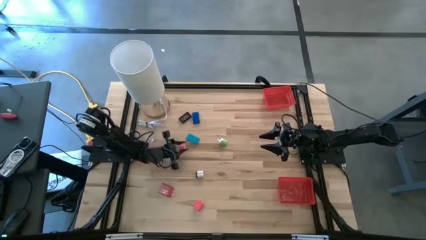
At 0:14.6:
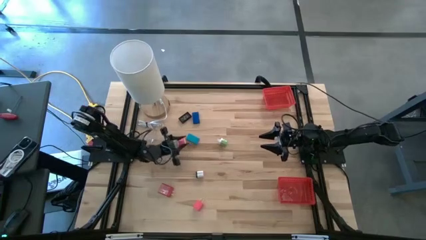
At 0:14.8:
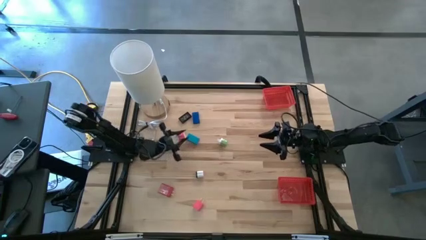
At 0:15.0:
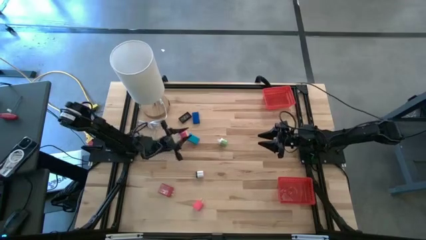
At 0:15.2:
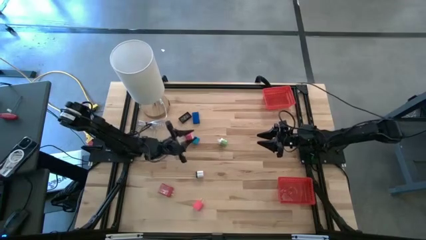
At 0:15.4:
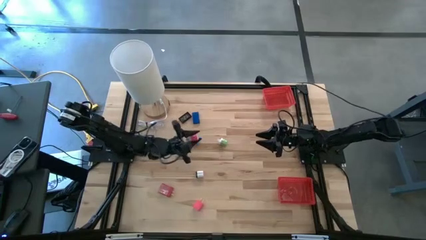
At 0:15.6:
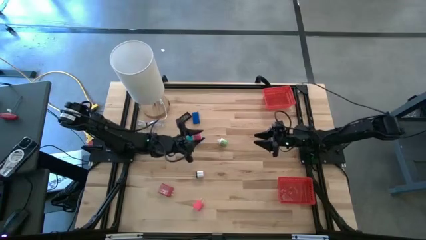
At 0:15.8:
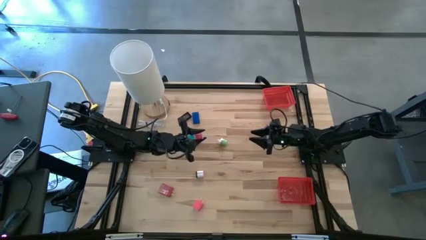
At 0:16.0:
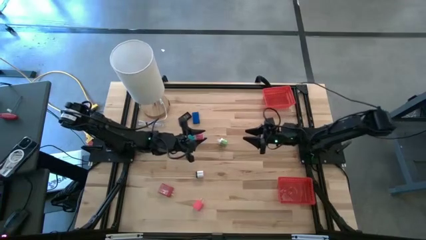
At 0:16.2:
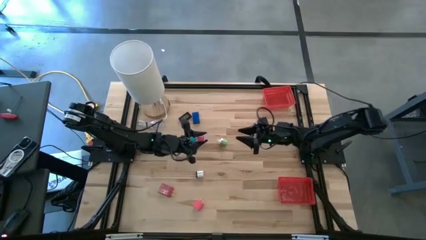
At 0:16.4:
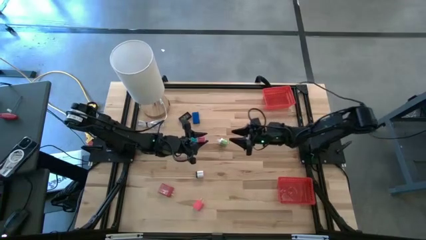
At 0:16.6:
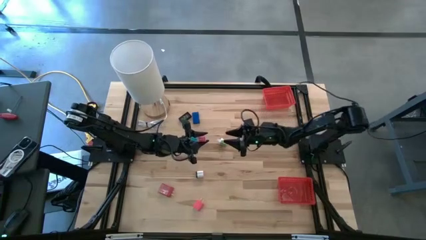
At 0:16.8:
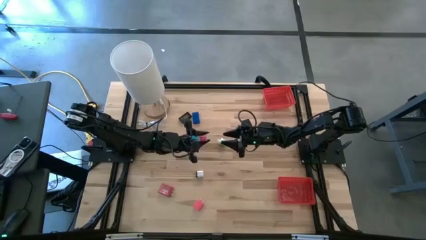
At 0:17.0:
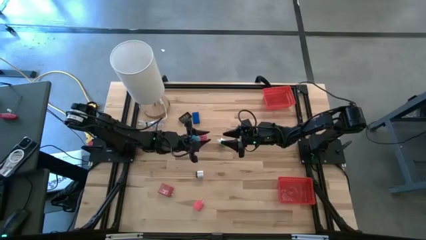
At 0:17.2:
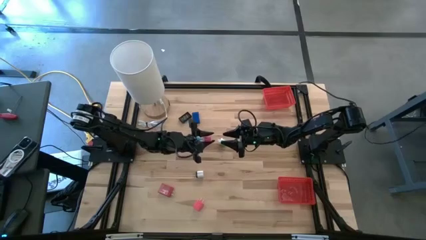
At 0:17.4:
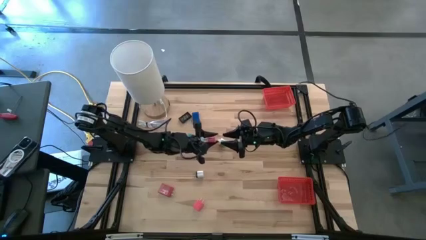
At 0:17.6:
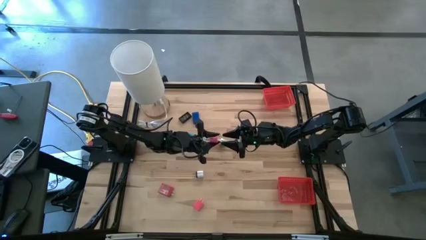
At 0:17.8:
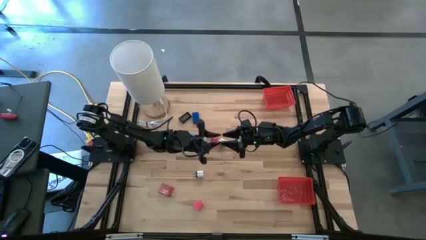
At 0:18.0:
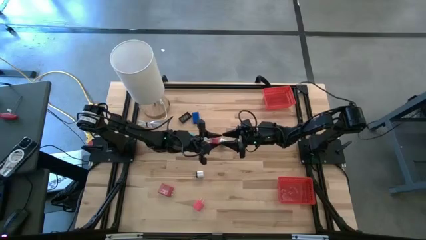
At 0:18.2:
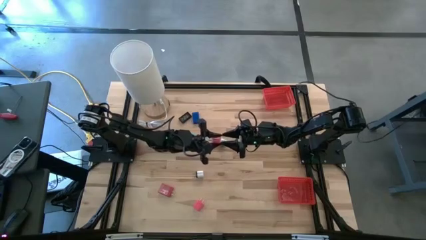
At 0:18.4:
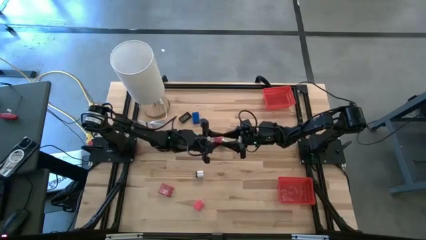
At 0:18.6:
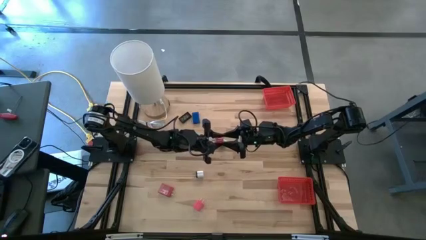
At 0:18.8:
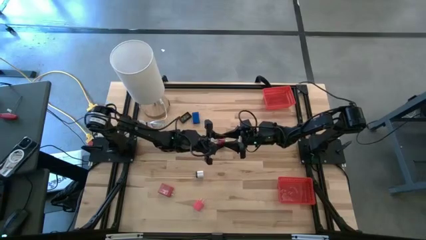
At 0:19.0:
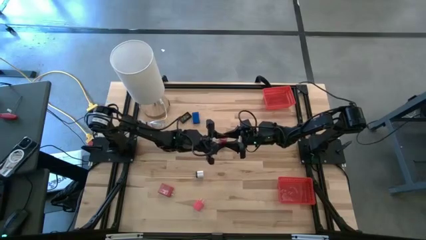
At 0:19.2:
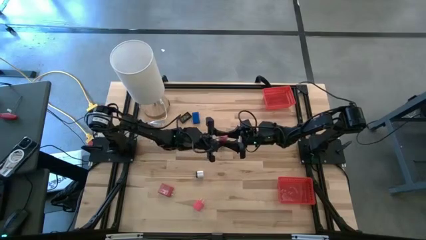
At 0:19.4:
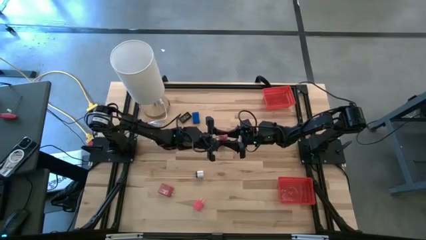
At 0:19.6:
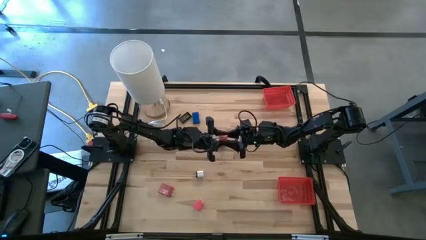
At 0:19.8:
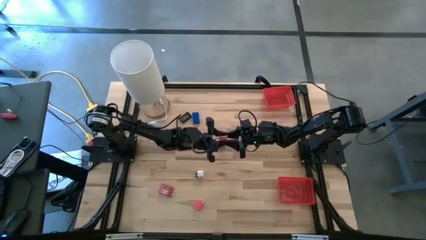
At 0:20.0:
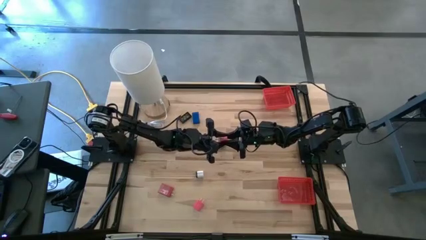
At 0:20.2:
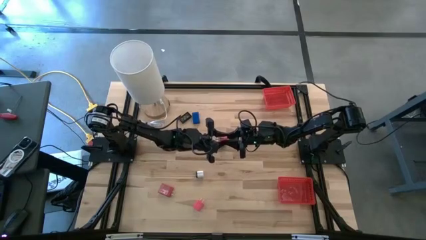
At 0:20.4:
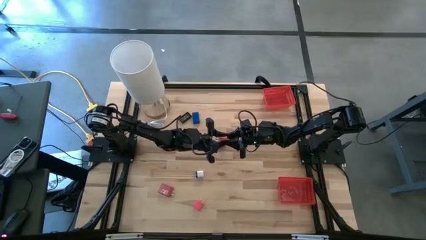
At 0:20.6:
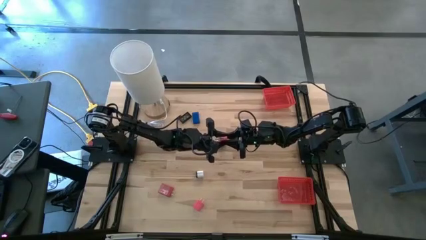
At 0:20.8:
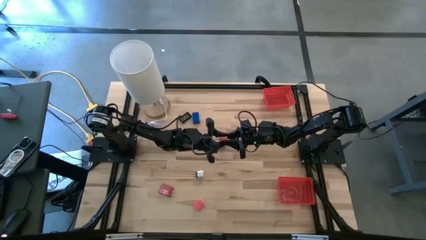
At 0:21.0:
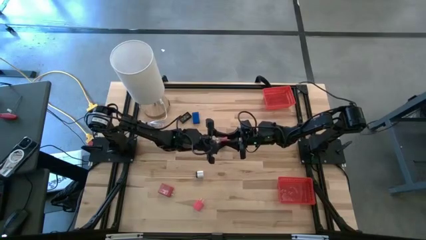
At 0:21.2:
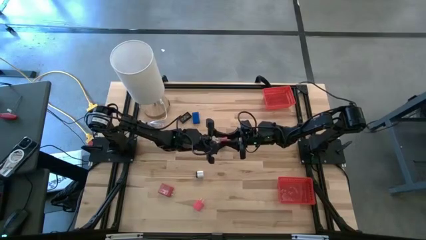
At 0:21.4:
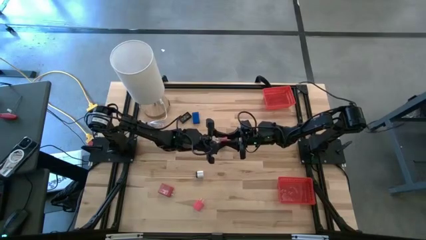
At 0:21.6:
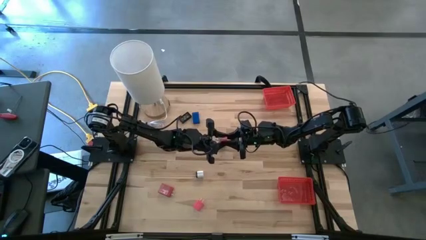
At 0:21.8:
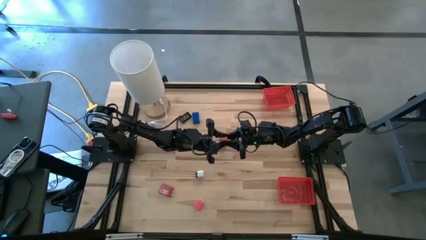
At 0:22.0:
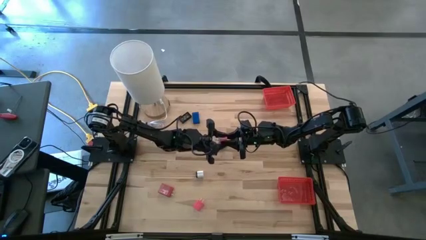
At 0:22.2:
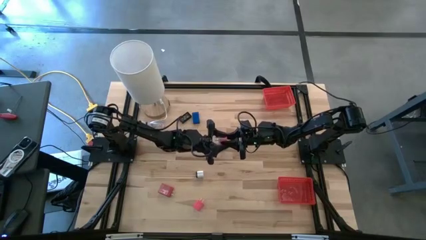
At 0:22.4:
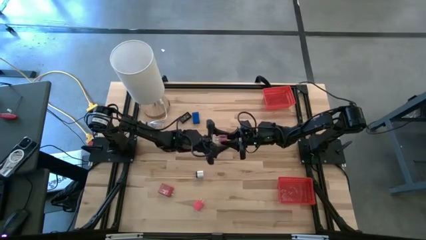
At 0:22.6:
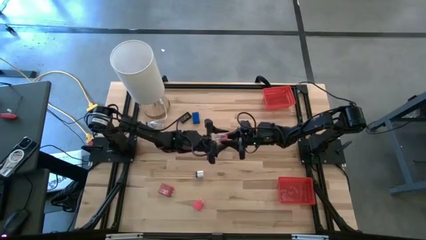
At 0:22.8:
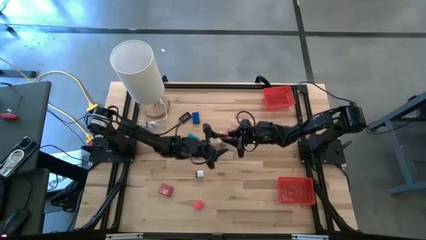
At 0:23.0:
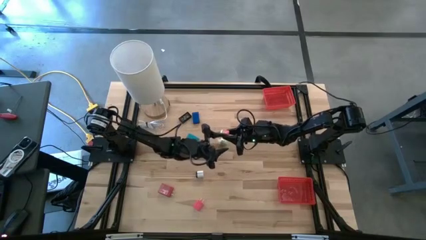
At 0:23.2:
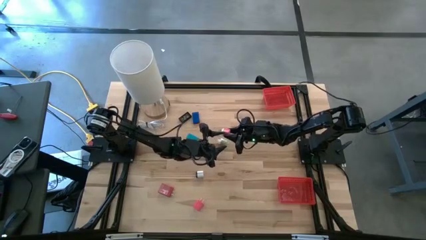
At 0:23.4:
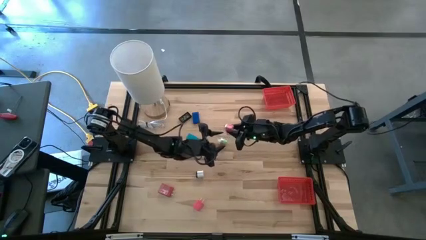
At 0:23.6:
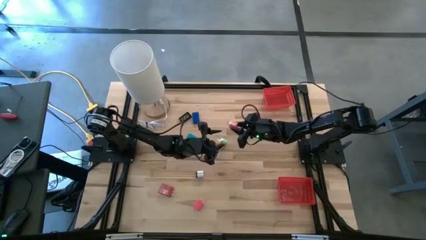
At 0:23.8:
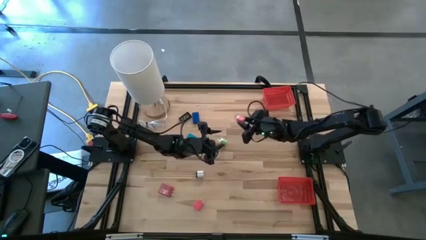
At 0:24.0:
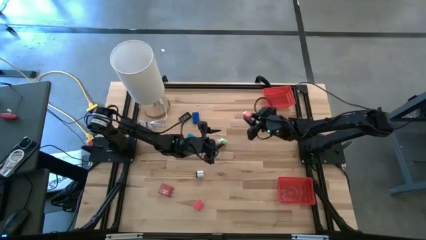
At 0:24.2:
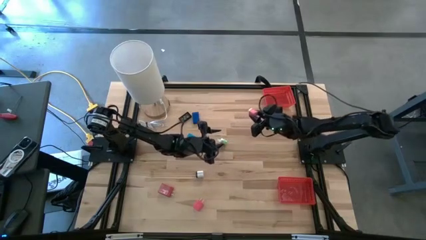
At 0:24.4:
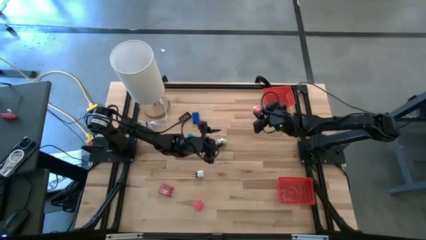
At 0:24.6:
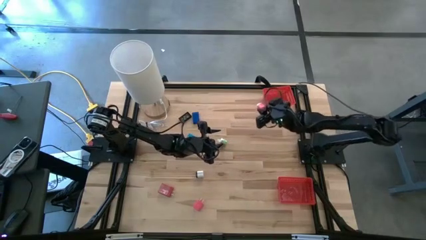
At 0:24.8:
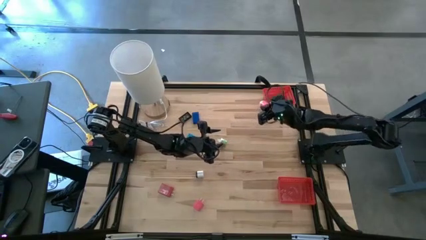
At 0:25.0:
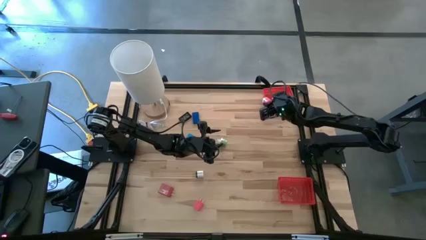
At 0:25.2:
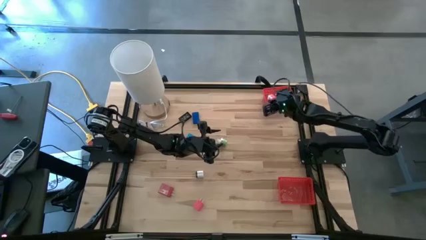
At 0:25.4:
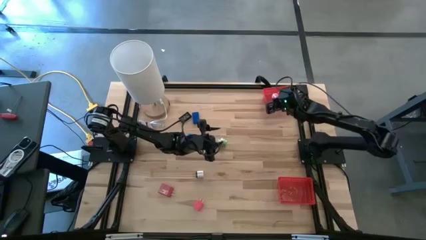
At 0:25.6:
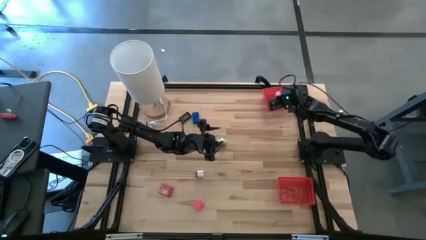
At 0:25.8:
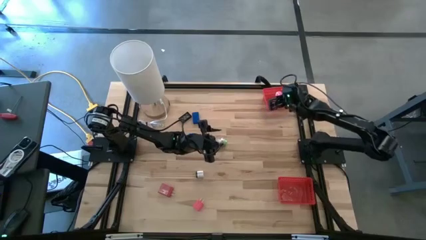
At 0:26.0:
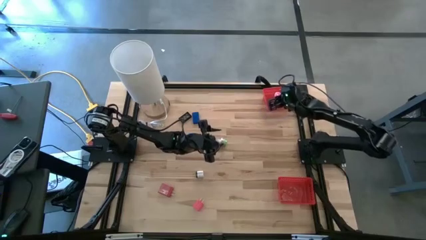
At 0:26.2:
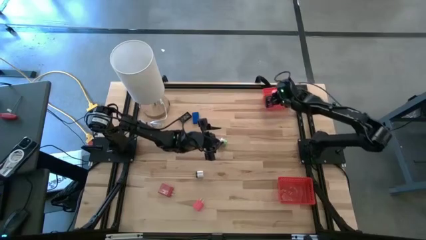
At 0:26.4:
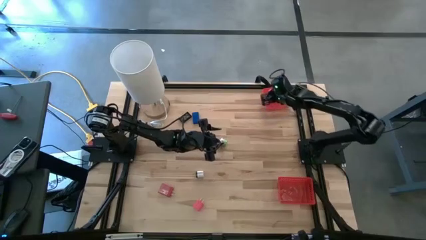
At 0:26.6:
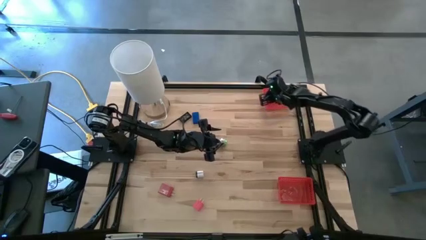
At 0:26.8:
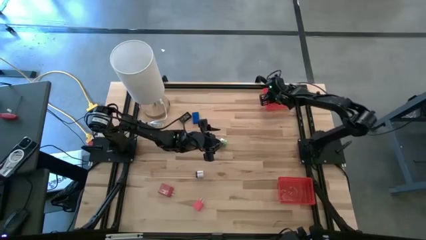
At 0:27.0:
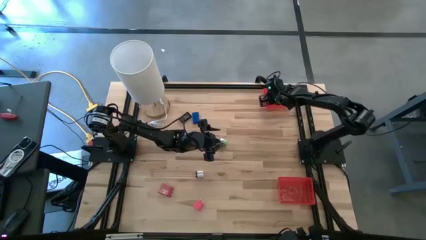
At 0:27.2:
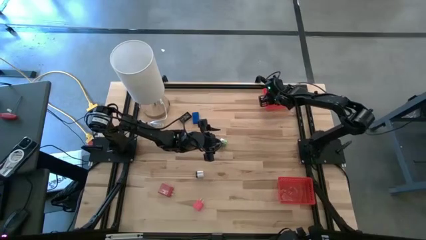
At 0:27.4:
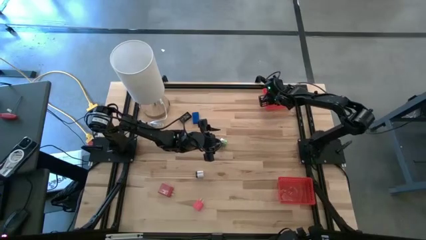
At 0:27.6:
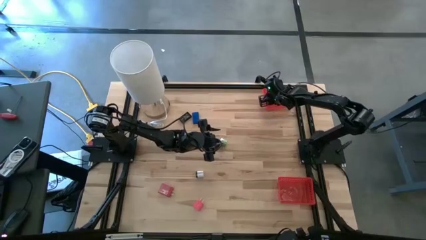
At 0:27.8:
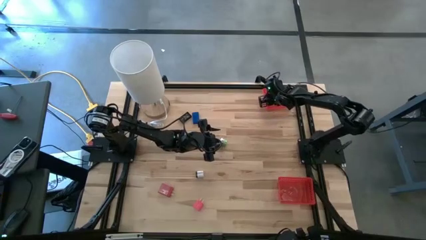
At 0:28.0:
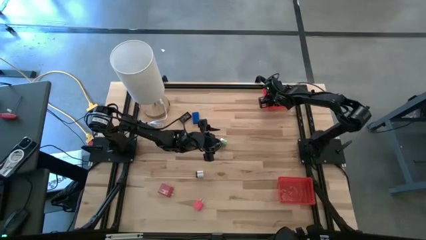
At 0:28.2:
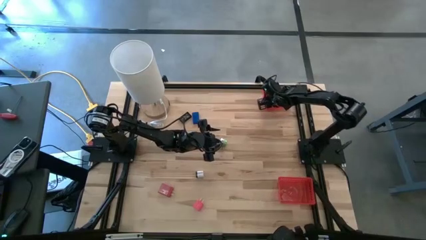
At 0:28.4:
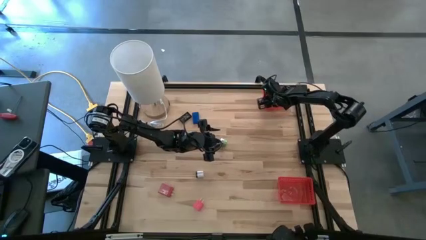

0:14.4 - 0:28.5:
Task: Pick & Place Office items
Put the pink white charger adapter into the top red basket
